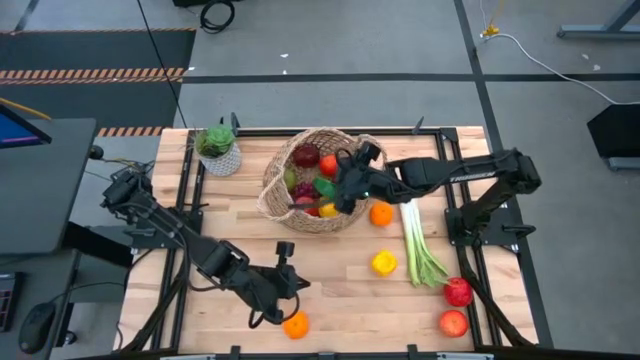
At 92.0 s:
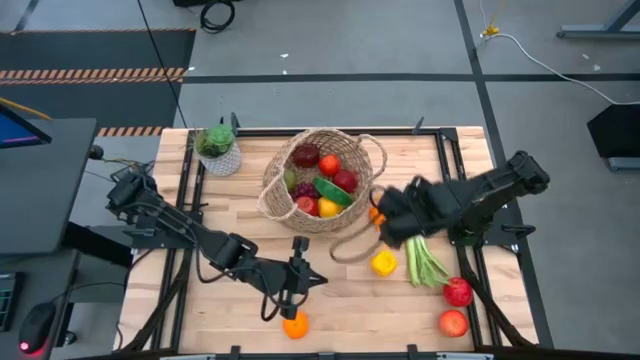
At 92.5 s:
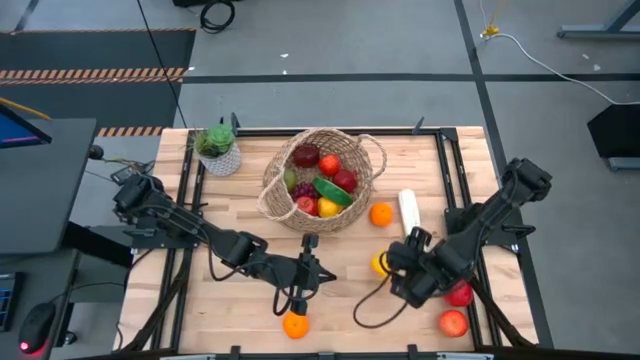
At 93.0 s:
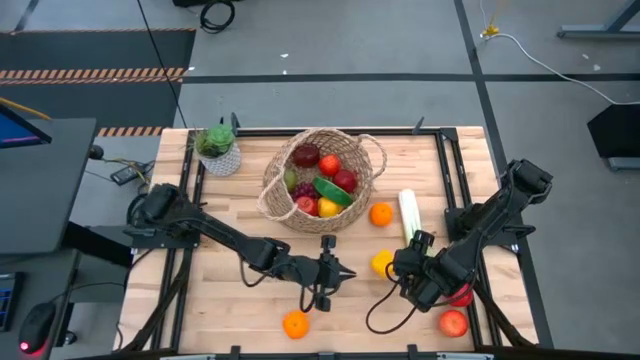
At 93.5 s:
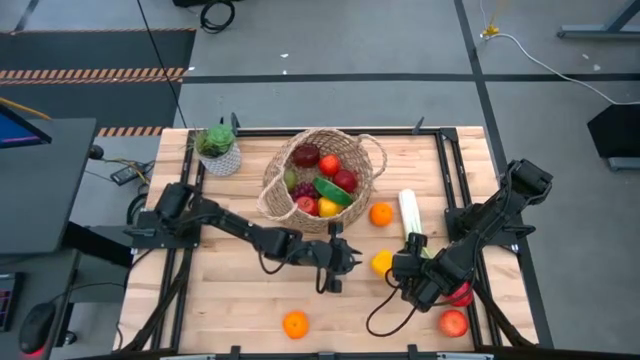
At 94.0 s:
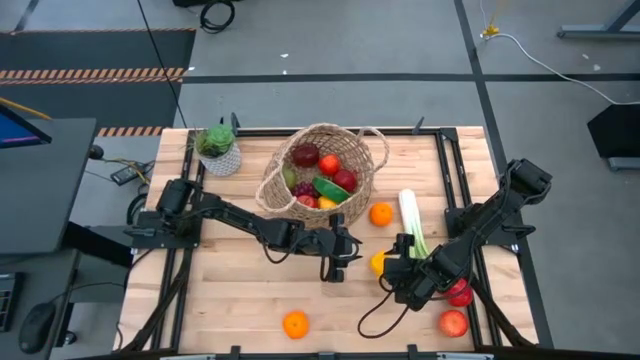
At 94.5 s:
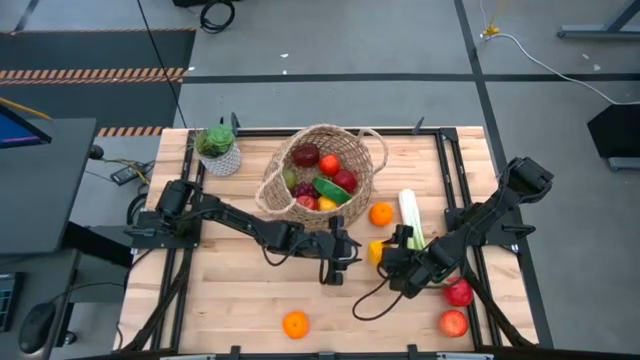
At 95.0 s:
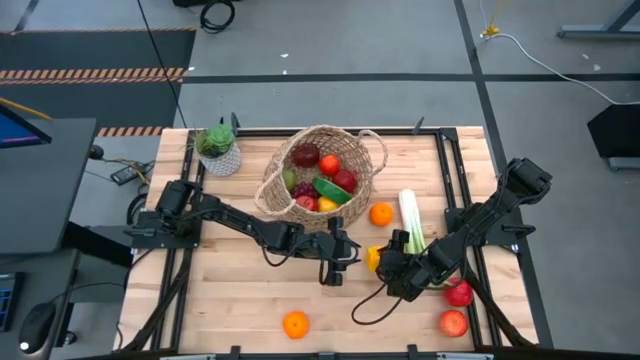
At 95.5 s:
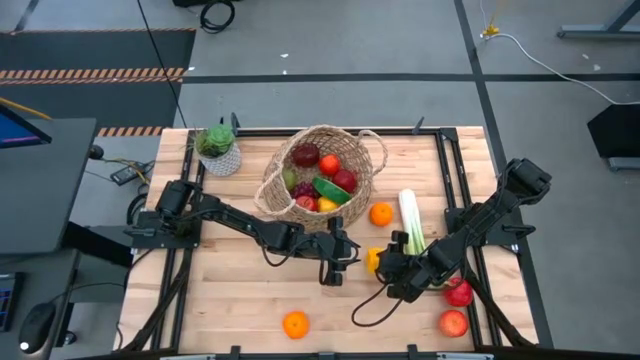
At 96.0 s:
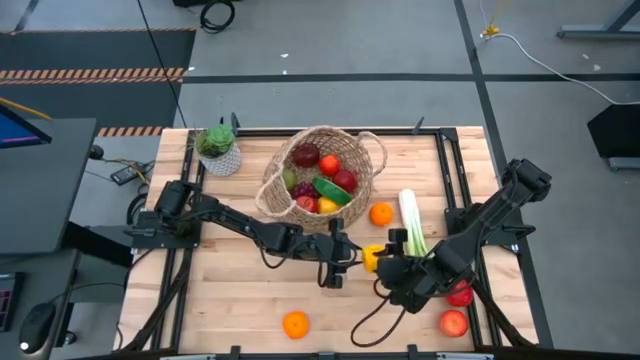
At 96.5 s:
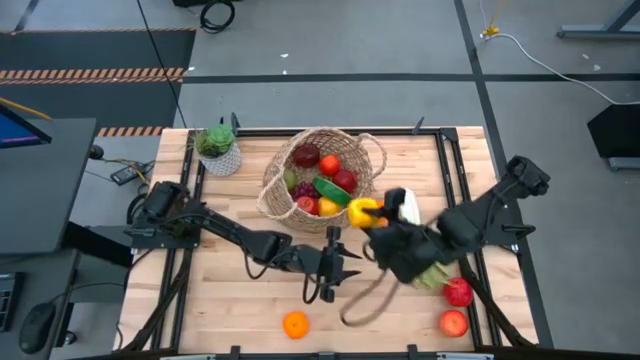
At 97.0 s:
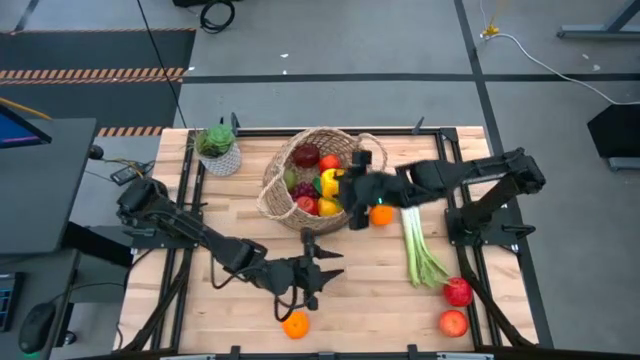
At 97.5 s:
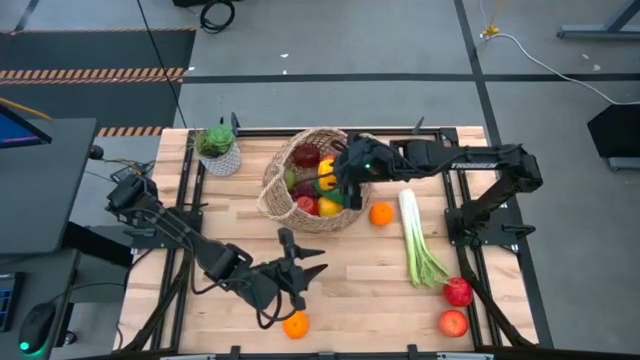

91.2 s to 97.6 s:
Task: Build produce basket
Put the bell pepper into the basket

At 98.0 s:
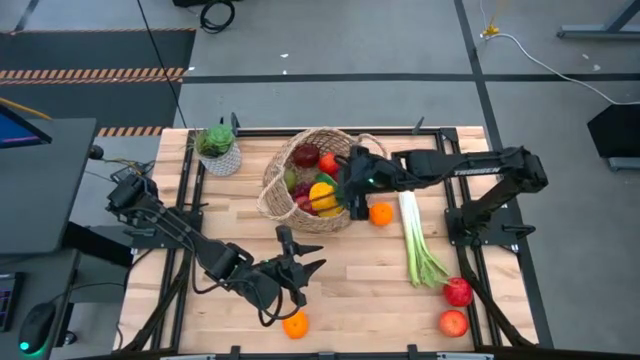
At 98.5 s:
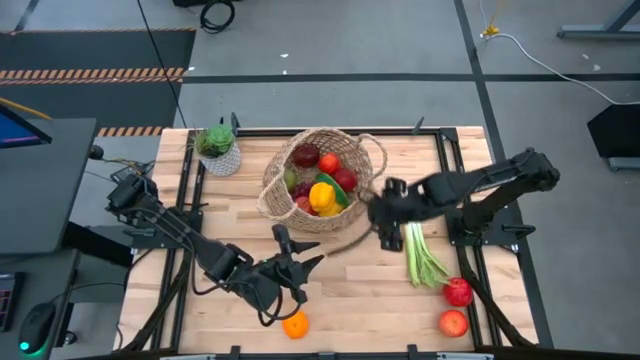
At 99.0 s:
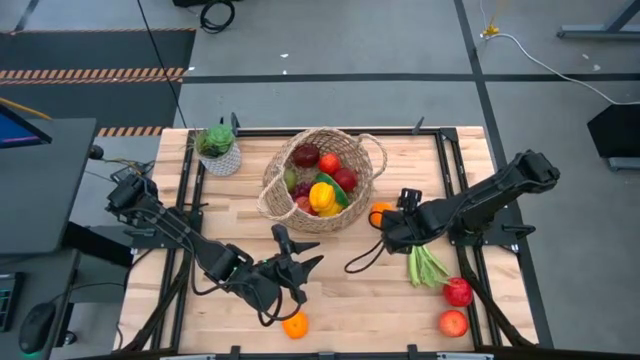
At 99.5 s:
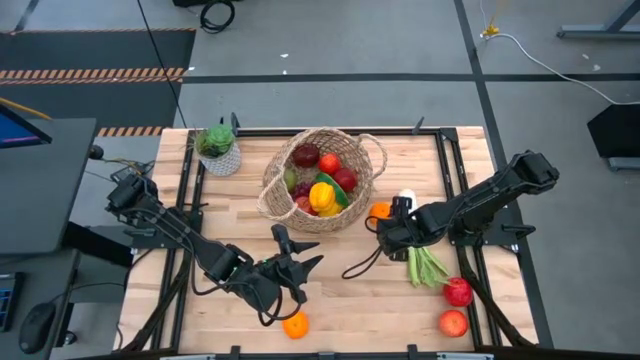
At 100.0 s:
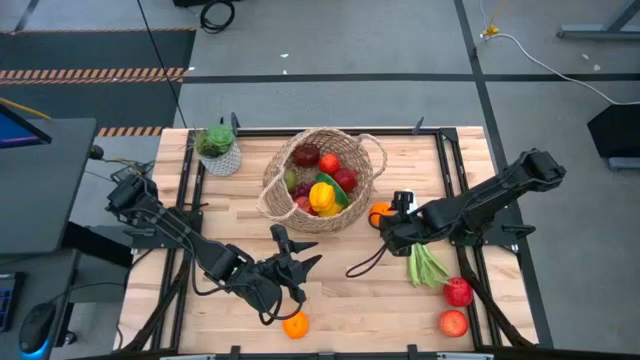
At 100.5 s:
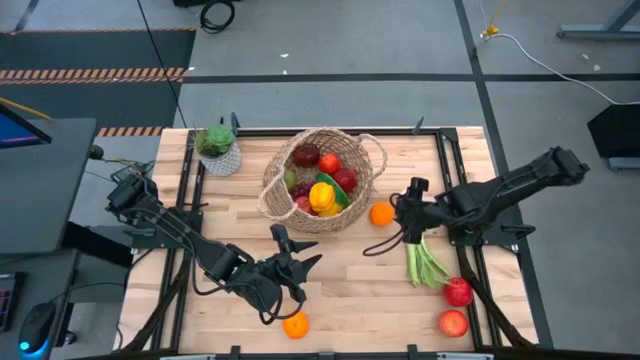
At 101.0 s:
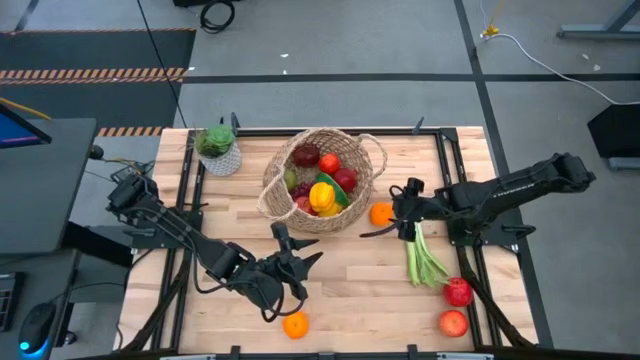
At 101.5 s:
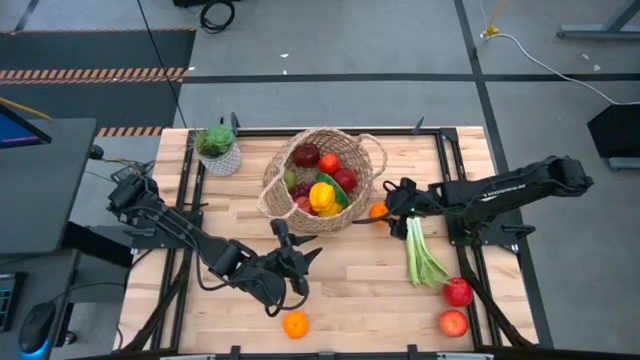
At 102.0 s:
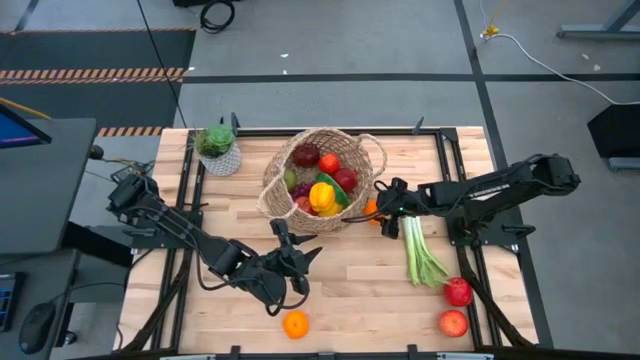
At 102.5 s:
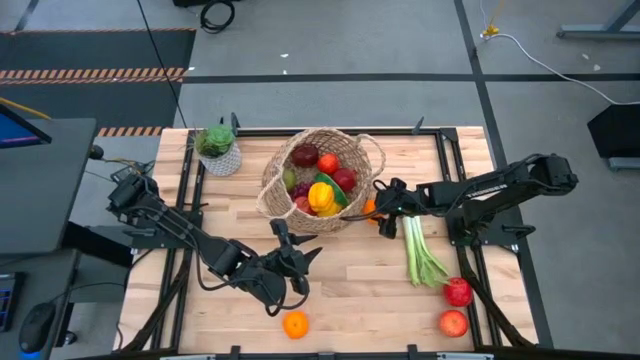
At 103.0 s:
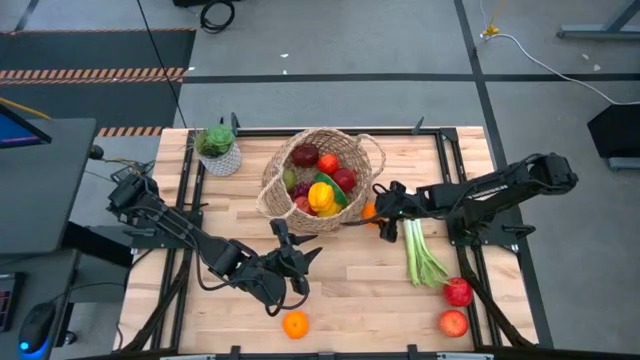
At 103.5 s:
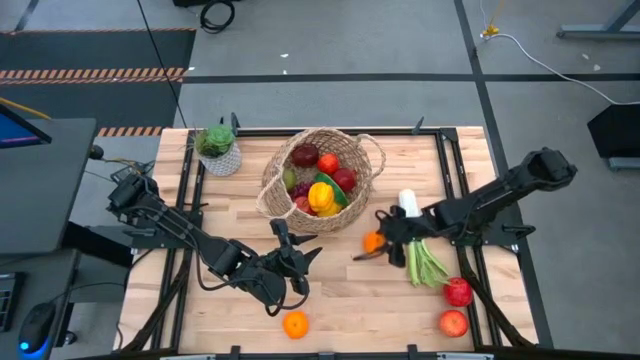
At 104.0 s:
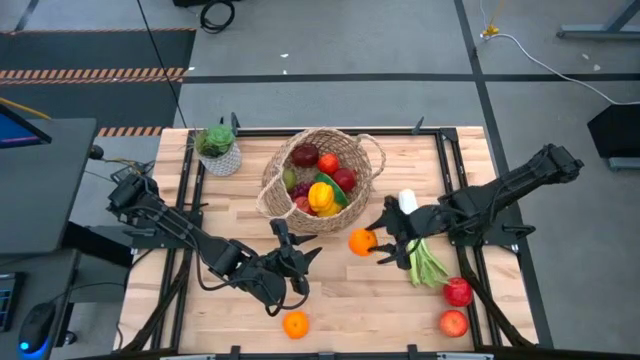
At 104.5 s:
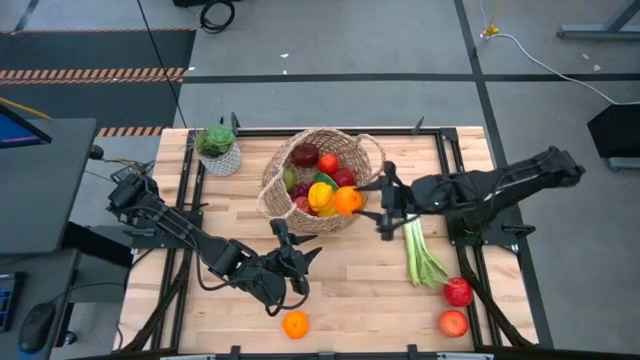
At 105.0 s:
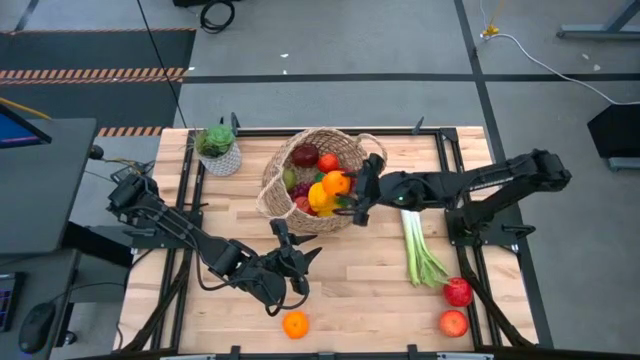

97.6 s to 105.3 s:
Put the orange into the basket

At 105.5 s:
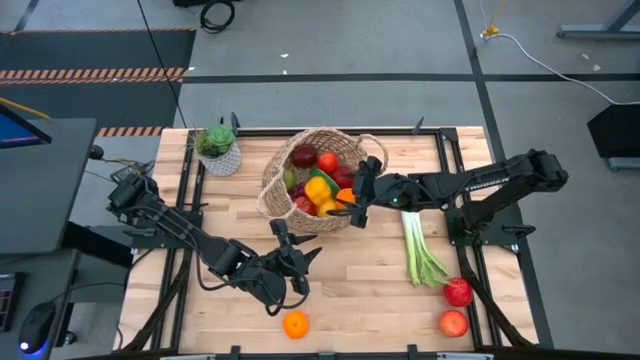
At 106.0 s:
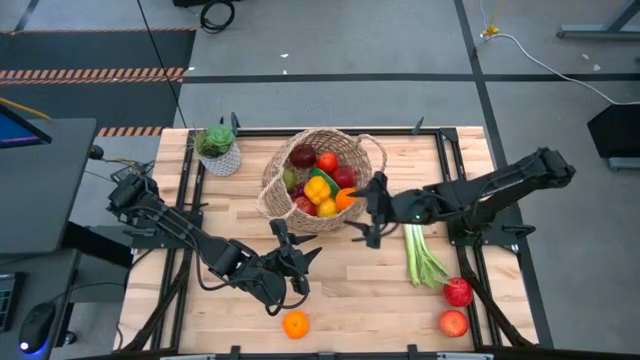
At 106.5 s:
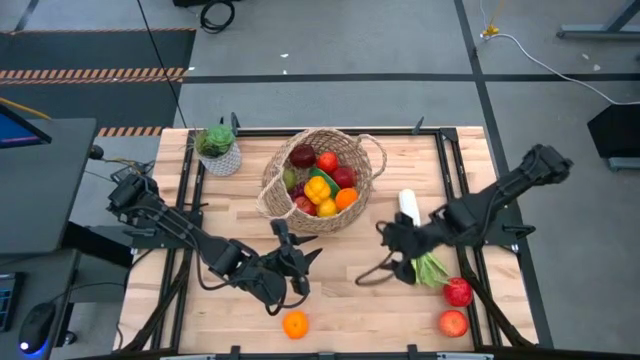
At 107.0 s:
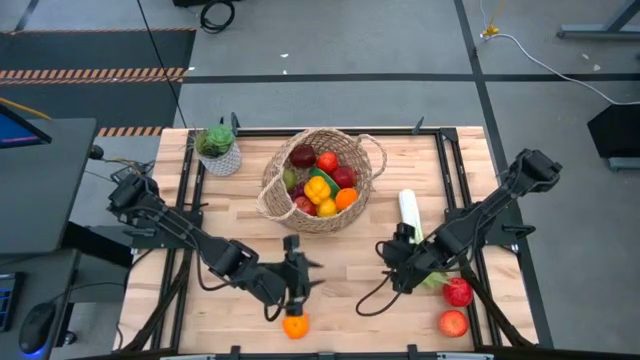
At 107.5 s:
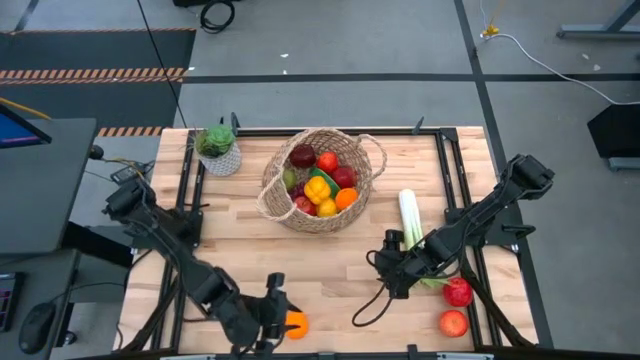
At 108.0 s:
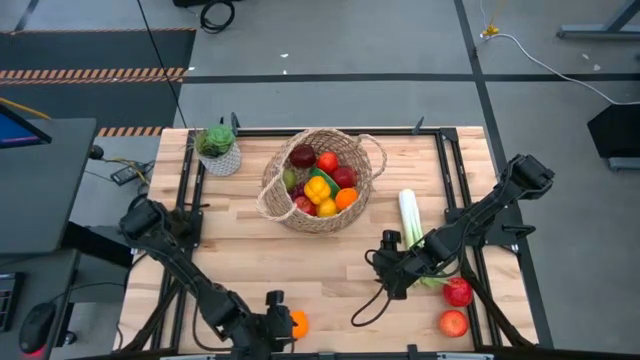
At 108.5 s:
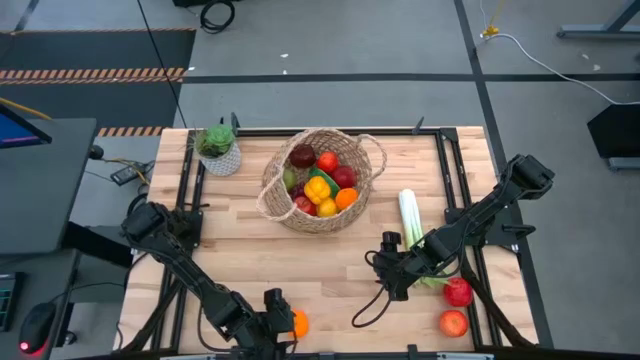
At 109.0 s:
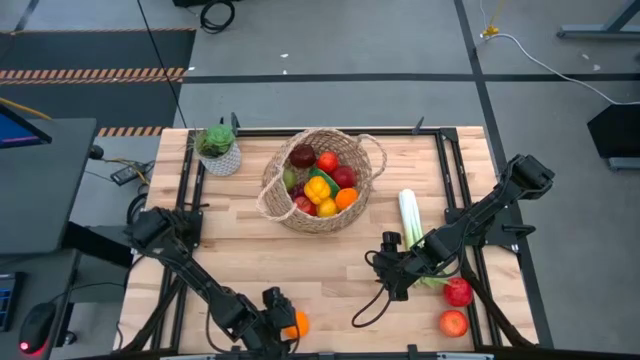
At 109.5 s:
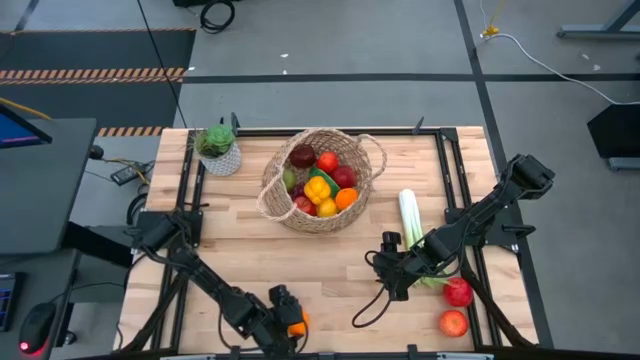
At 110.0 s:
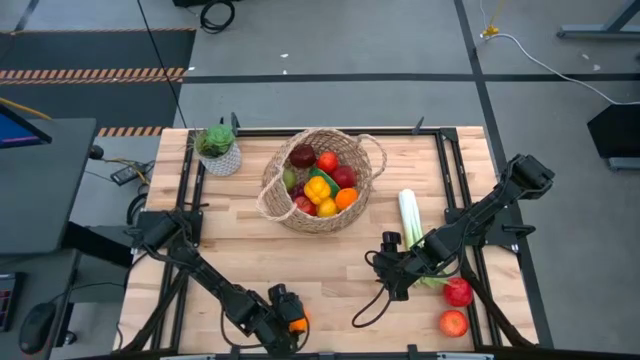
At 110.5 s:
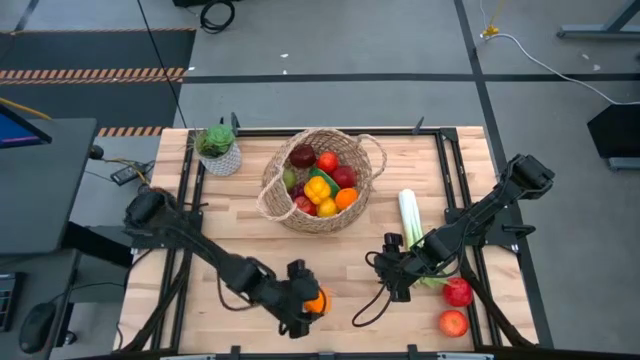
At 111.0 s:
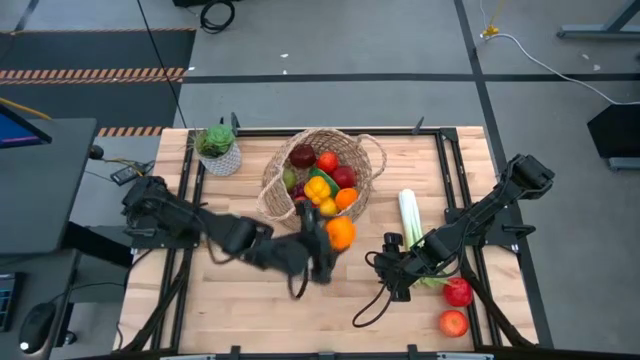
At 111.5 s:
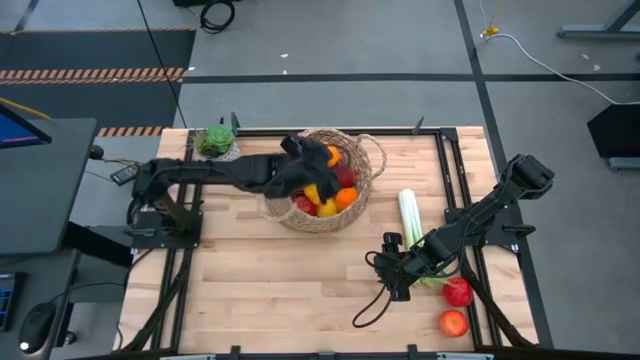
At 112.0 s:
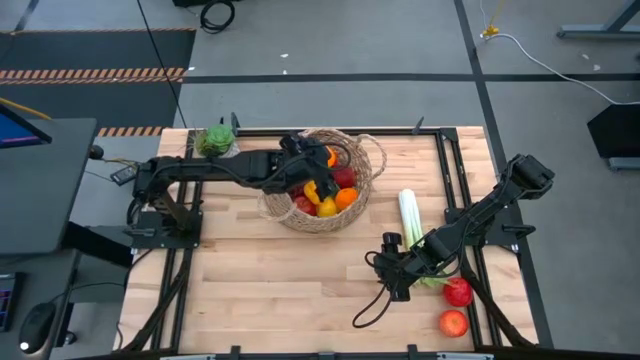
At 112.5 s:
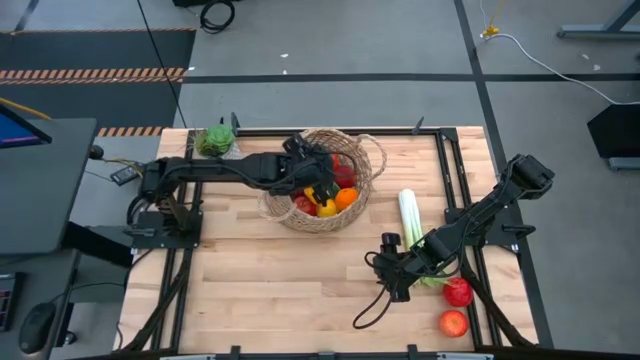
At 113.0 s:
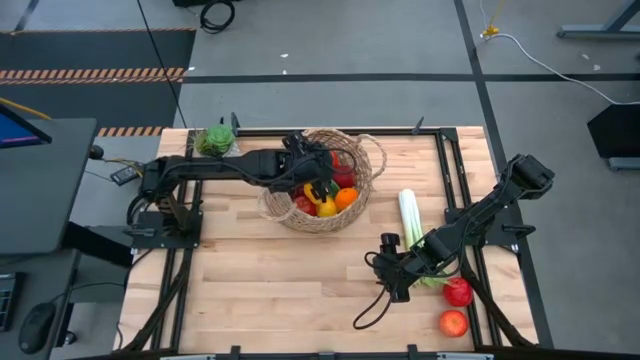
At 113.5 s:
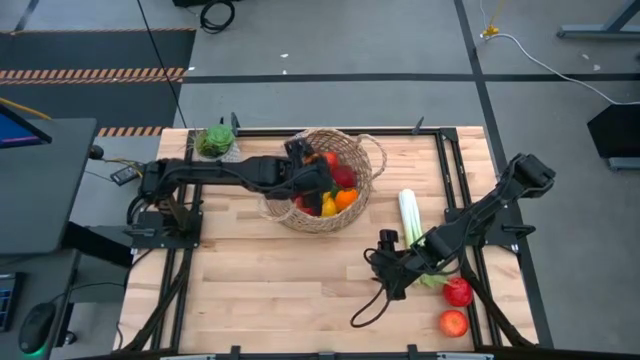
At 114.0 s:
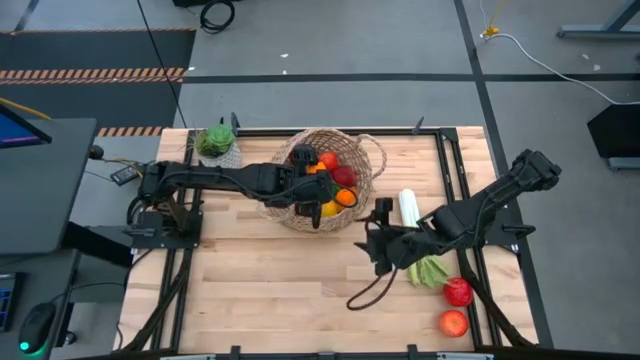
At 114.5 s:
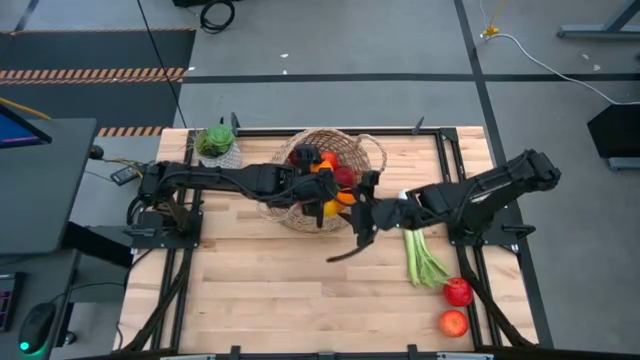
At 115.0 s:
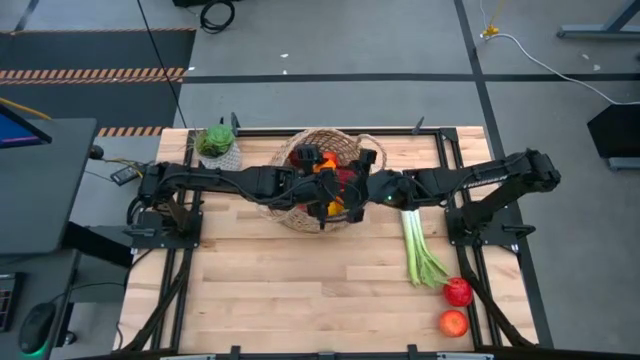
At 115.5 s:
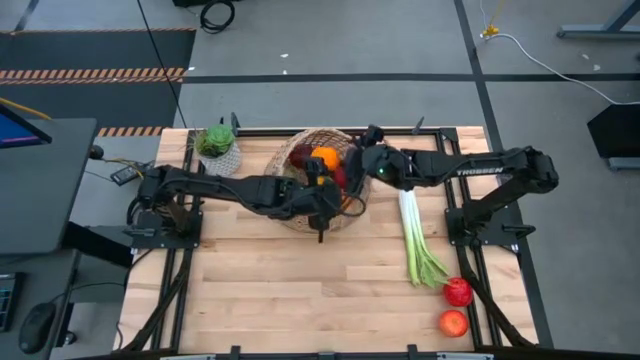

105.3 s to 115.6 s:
Put the orange into the basket
